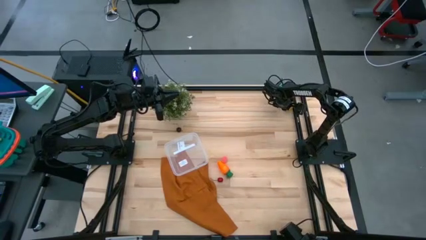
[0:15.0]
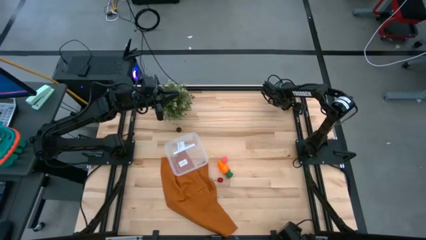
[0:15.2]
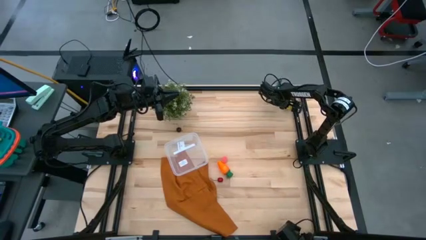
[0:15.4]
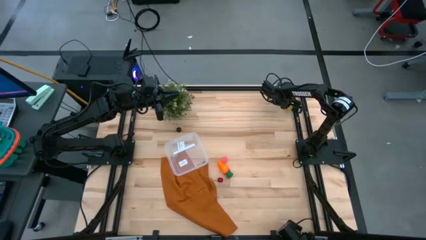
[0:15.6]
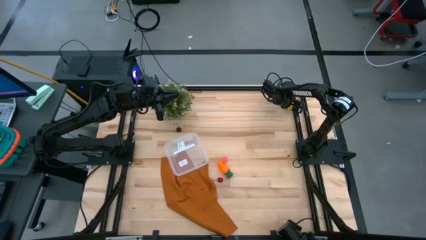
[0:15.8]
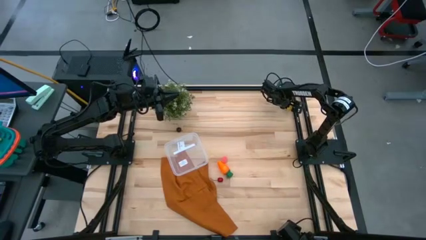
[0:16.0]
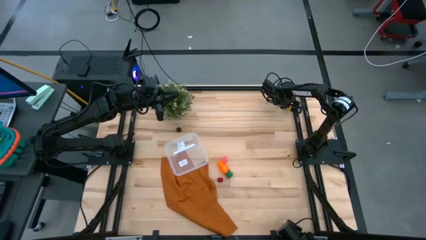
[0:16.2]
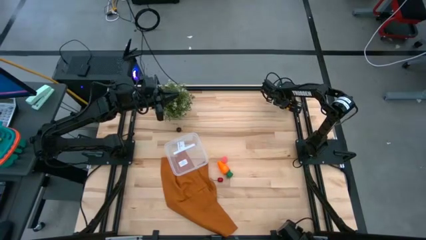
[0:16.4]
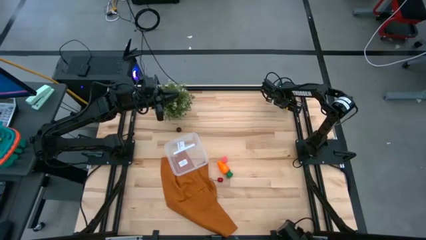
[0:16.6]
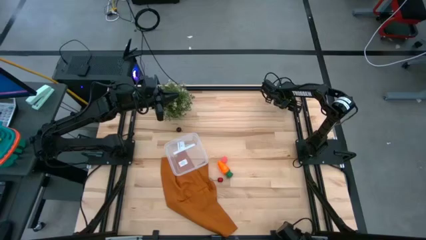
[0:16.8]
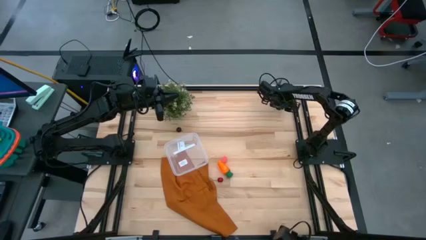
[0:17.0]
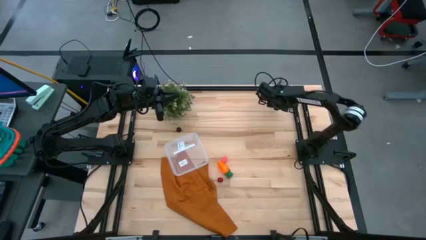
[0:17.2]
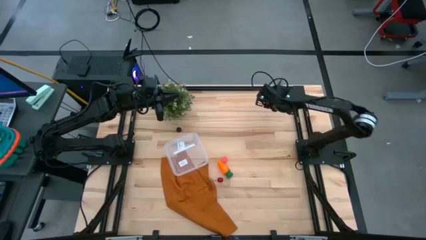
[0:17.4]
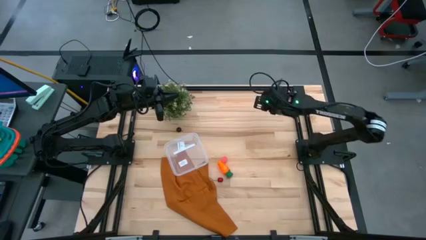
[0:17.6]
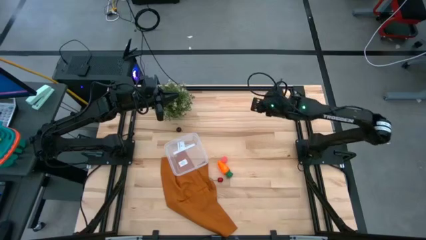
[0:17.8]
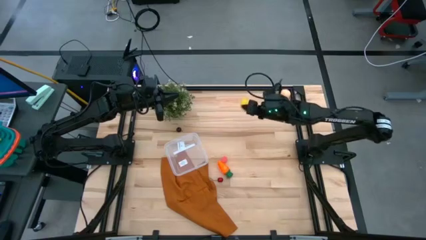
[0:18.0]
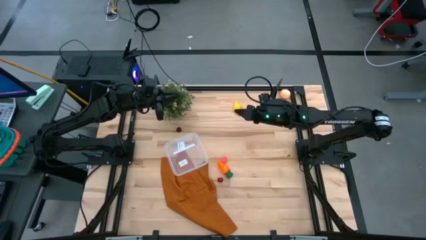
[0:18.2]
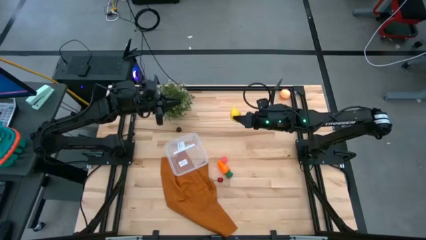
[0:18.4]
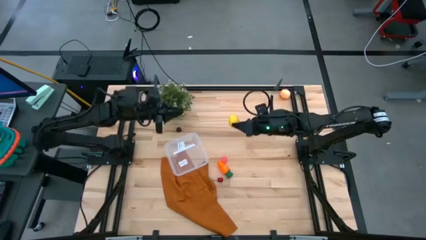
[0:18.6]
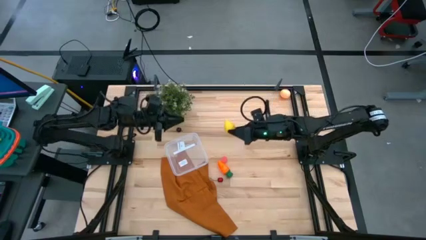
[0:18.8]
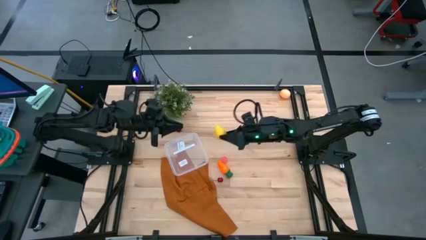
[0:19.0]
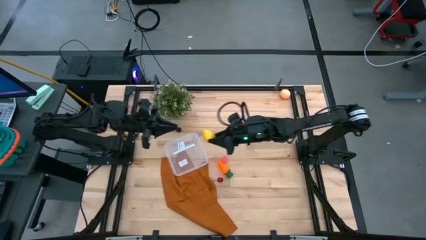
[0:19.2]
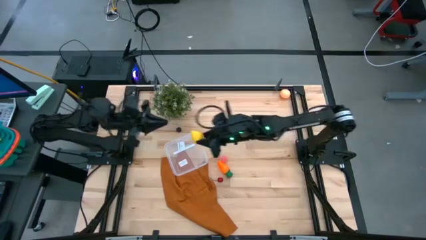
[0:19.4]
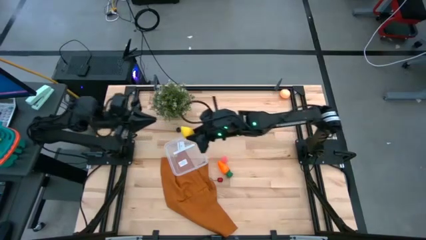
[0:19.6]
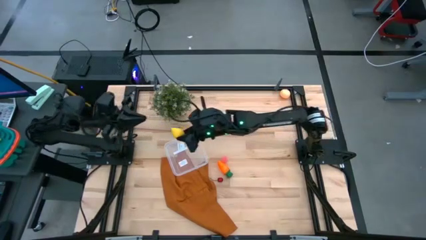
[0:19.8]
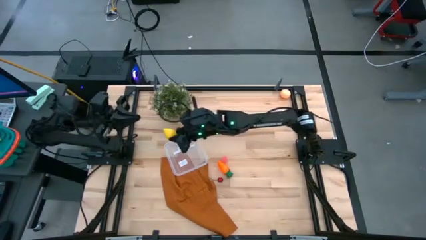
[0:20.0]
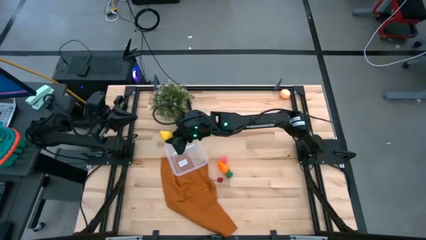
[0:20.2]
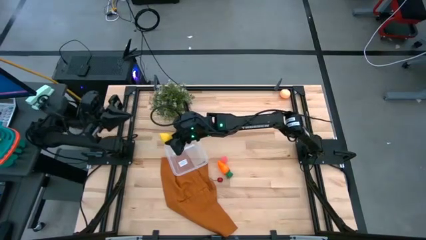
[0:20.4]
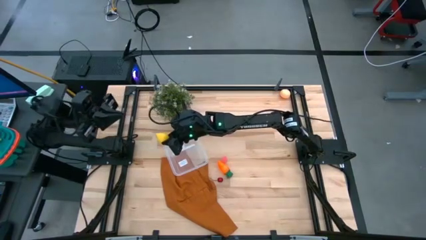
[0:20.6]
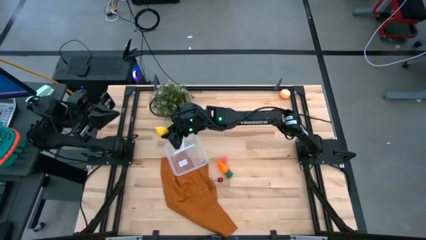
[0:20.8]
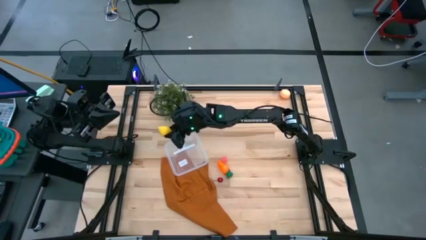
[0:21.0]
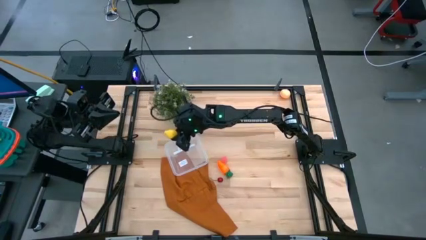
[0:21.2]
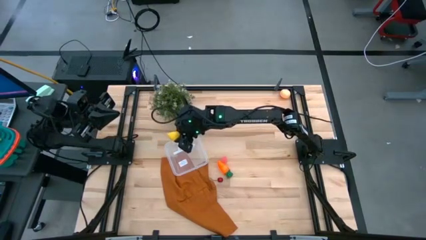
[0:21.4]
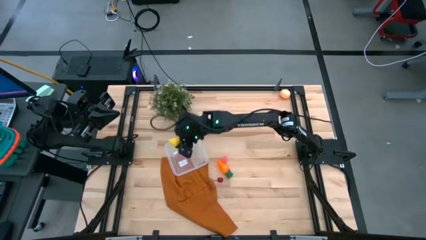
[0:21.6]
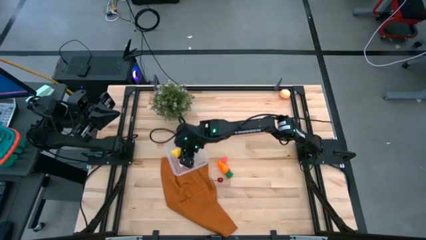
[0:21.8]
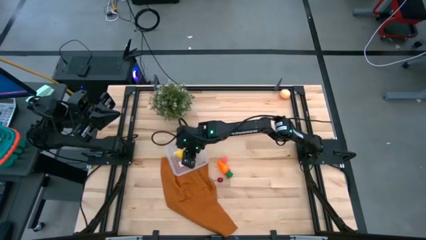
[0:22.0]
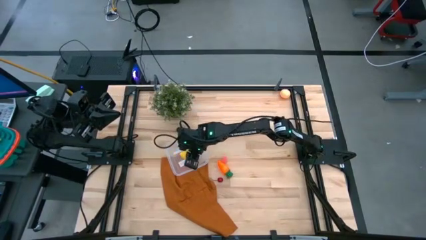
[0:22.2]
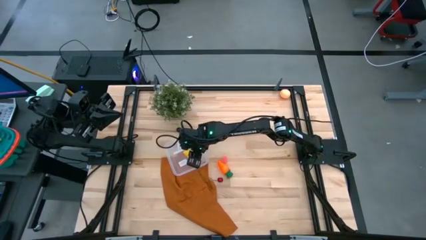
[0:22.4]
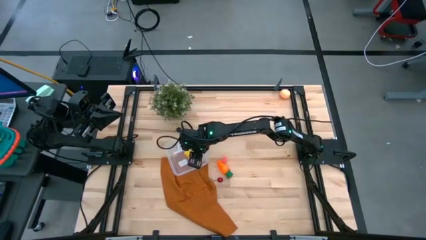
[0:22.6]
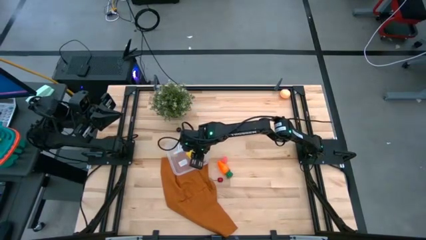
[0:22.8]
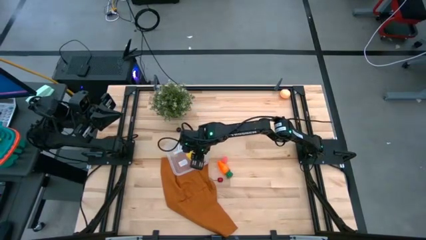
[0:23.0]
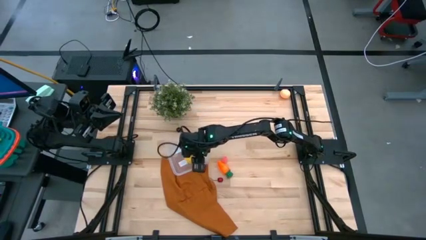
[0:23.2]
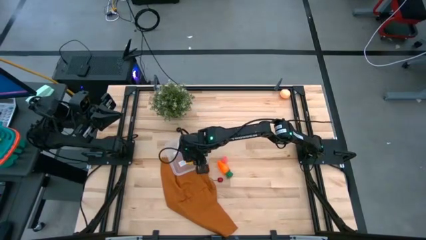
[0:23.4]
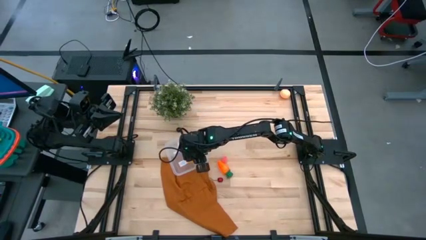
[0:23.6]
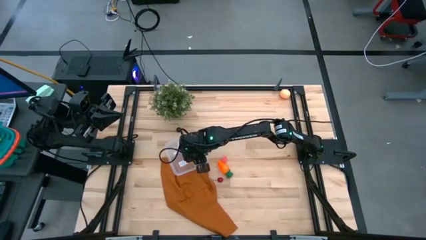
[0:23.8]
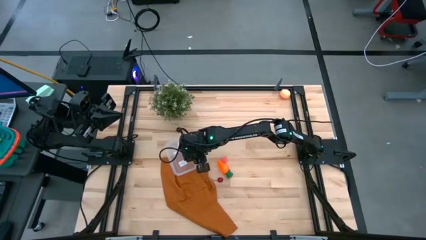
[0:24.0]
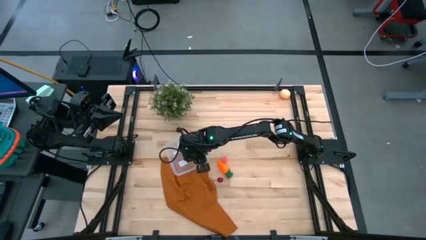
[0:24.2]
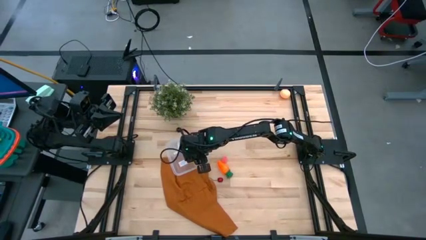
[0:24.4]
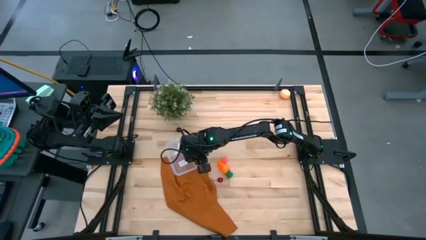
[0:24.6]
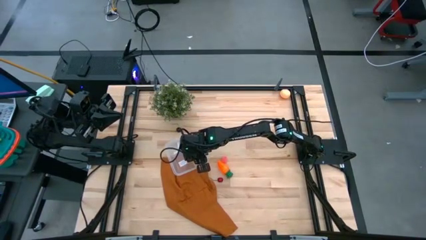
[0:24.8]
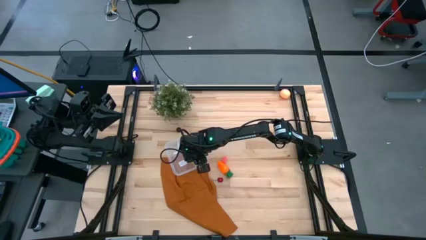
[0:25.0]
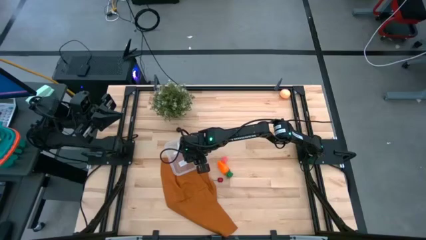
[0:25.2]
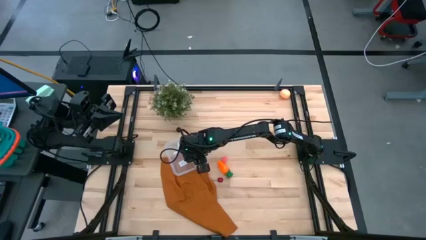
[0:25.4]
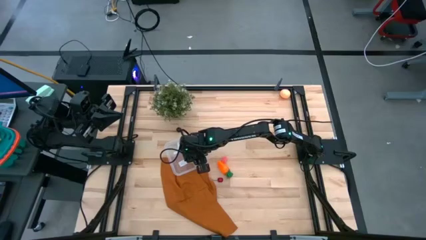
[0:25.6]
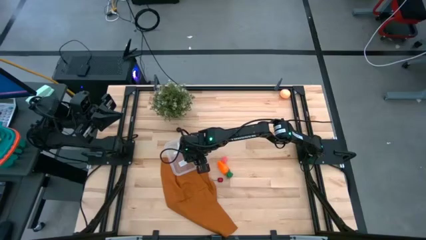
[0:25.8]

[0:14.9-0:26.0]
Task: Pick and placing Produce into tupperware
Put the yellow lemon into the bin

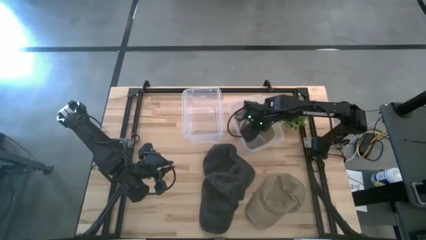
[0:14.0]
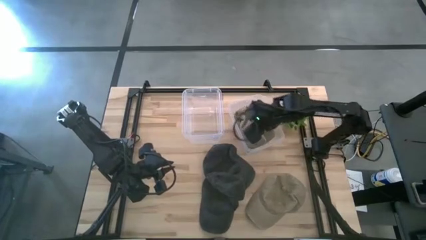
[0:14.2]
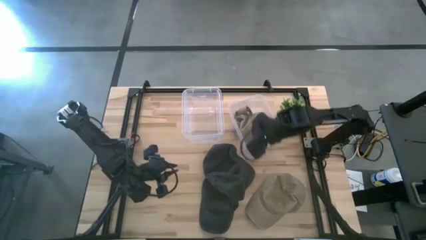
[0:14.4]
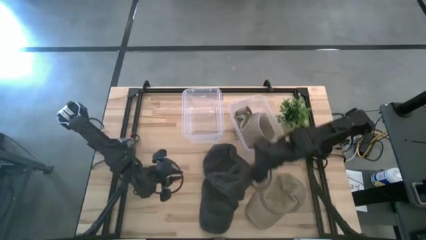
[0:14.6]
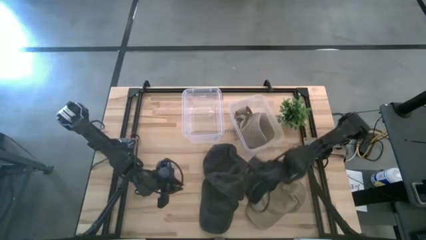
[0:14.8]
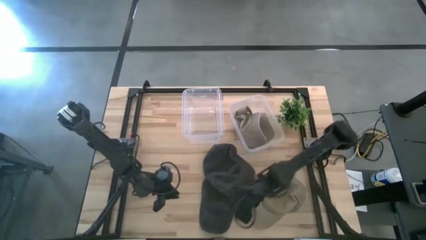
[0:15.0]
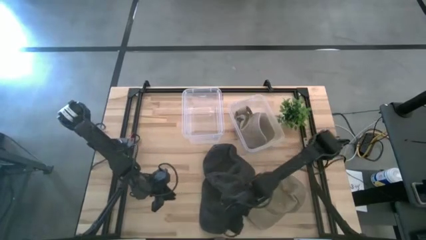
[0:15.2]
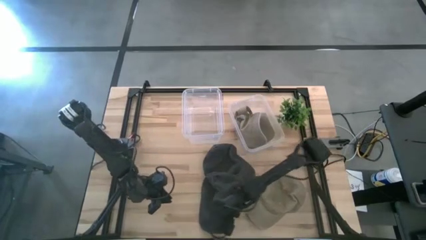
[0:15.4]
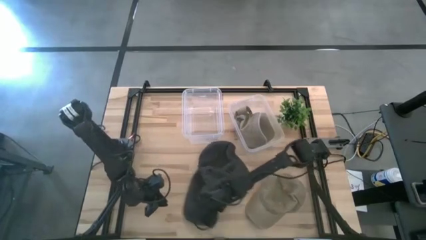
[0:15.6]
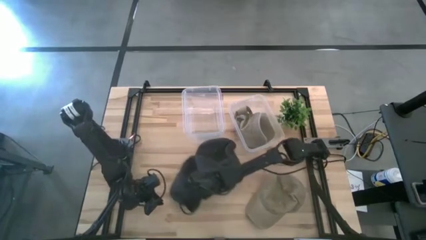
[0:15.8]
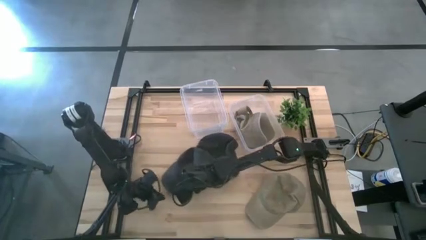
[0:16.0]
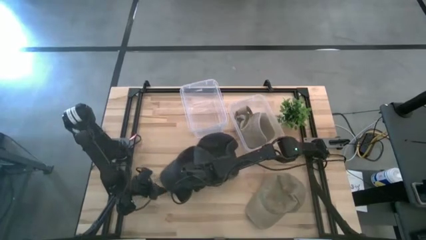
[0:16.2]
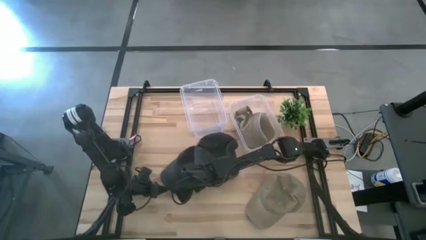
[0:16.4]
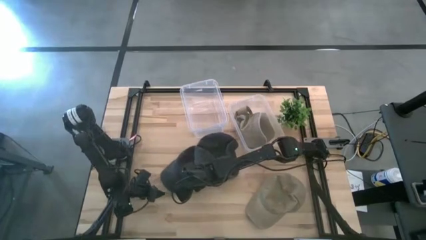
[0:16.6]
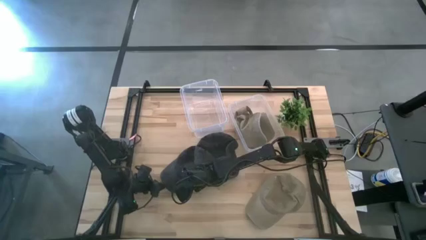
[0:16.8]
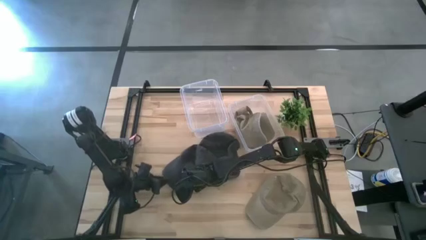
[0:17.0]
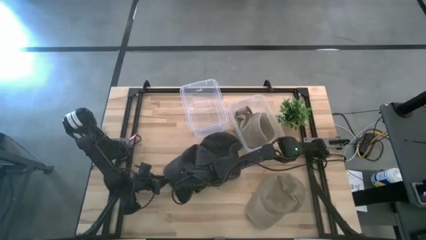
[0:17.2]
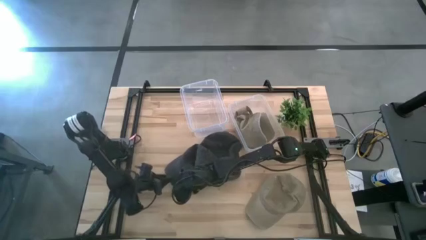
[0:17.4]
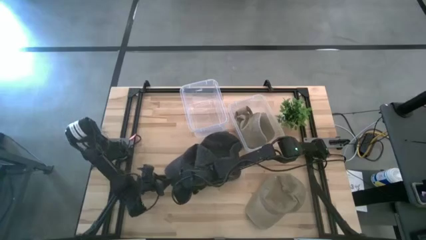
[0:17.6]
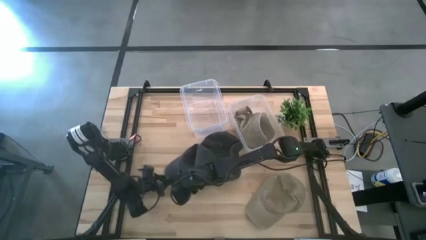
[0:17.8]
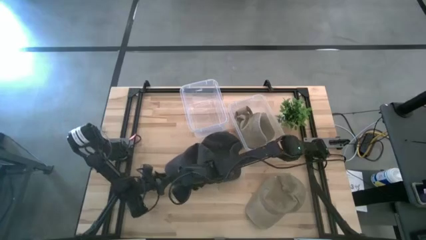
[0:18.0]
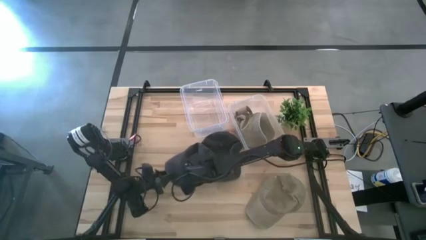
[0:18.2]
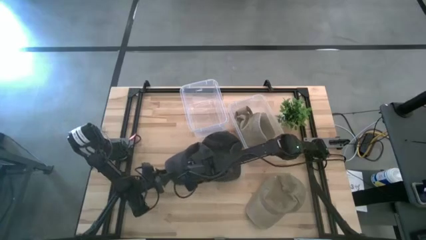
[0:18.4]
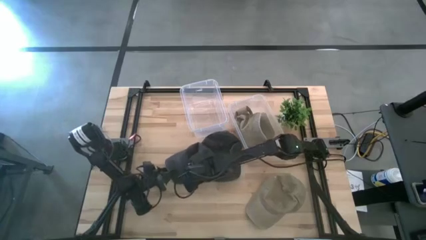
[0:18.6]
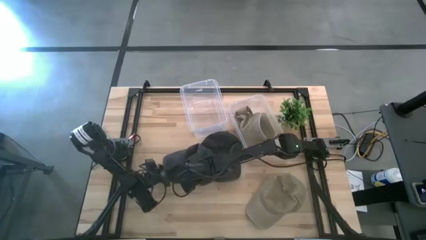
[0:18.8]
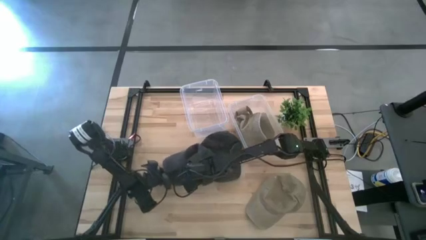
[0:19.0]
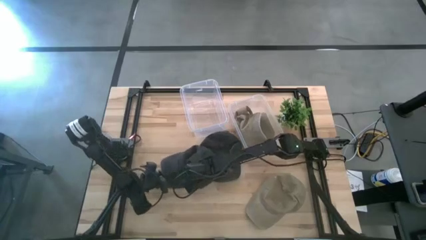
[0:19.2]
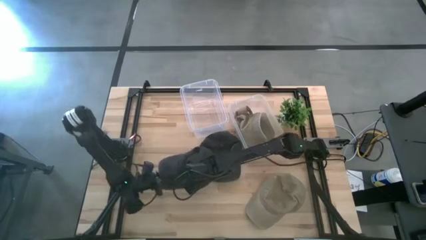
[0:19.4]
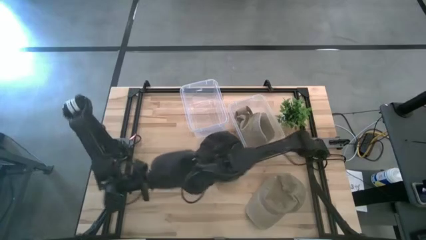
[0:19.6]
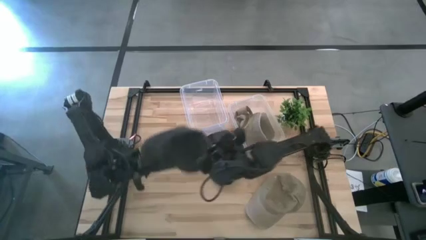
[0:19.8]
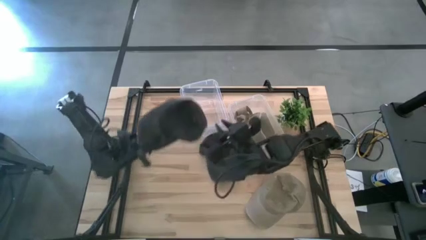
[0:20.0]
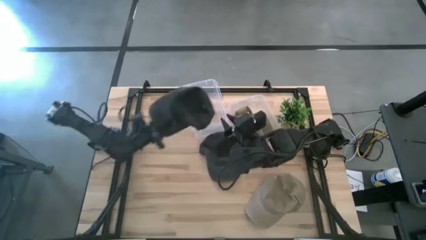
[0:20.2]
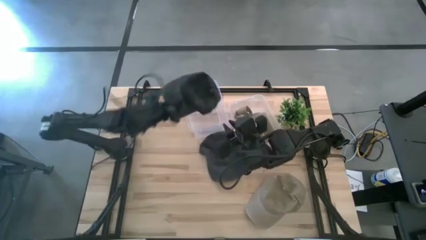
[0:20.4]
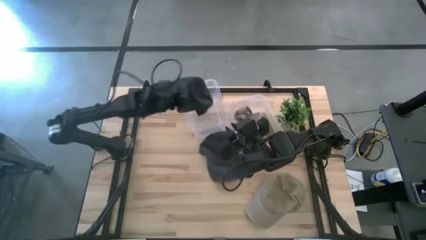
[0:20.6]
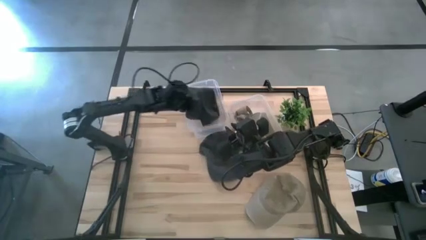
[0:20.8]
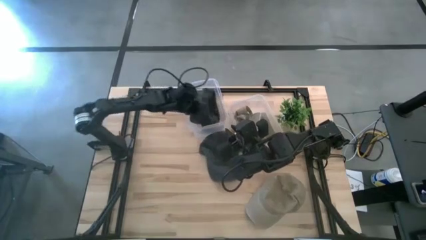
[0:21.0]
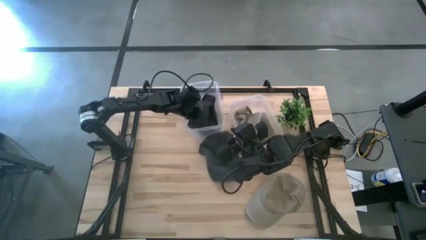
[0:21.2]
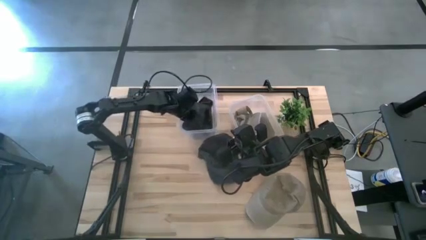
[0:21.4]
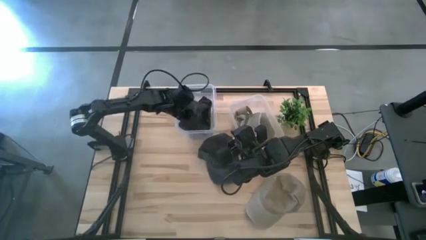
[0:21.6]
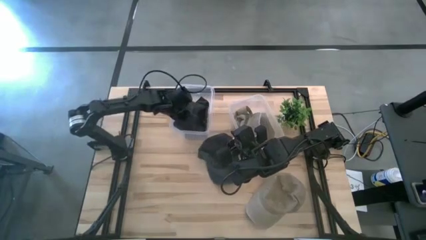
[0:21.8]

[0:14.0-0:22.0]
Task: Pick & Place hat
Put the bottom black cap into the left transparent bin
